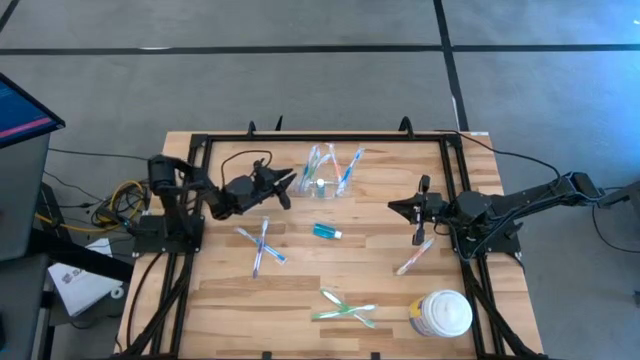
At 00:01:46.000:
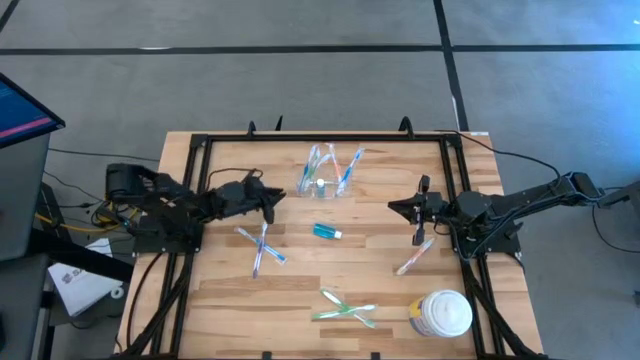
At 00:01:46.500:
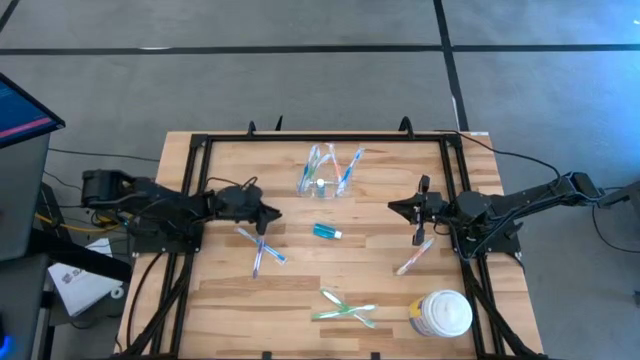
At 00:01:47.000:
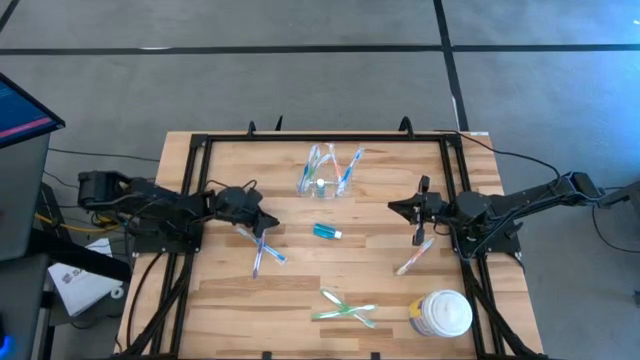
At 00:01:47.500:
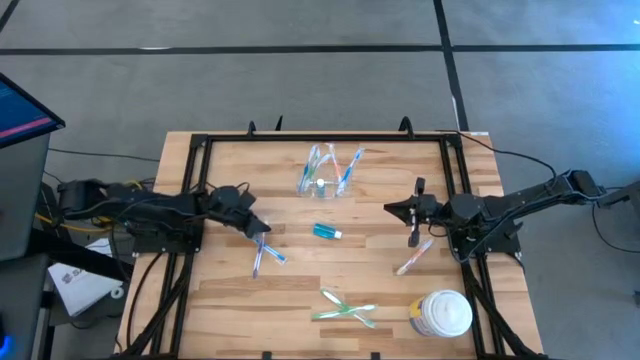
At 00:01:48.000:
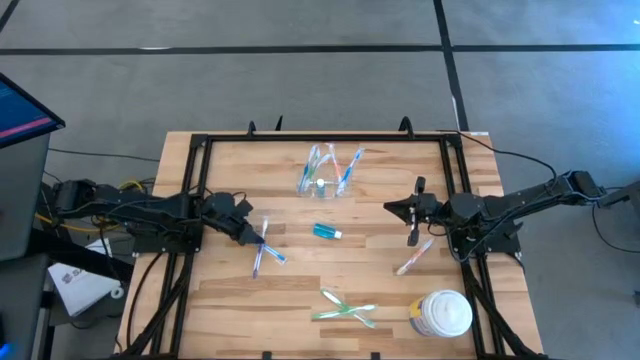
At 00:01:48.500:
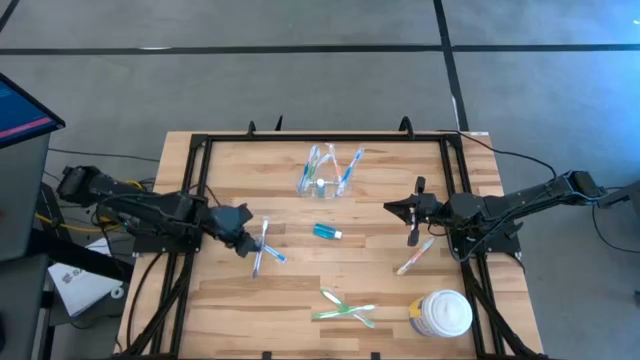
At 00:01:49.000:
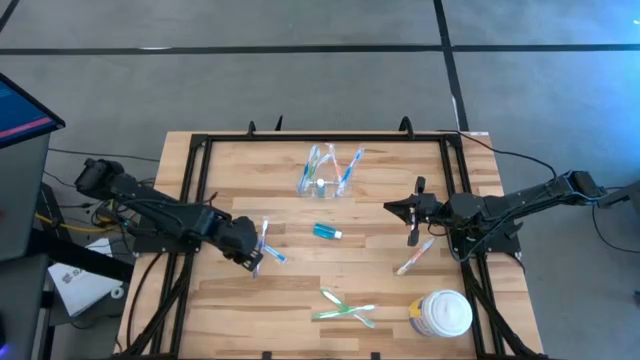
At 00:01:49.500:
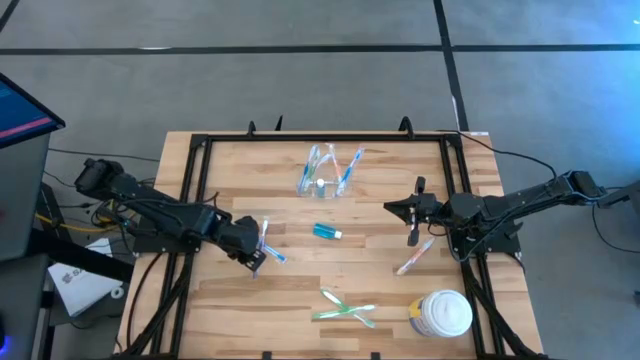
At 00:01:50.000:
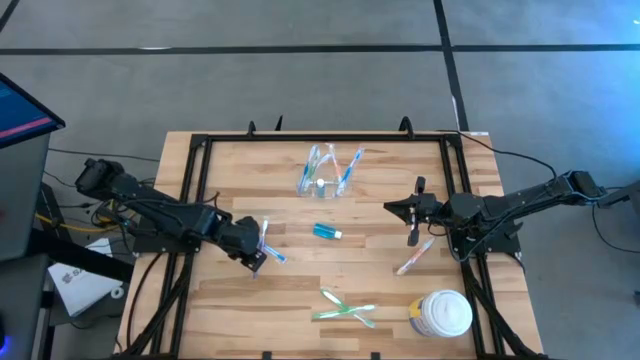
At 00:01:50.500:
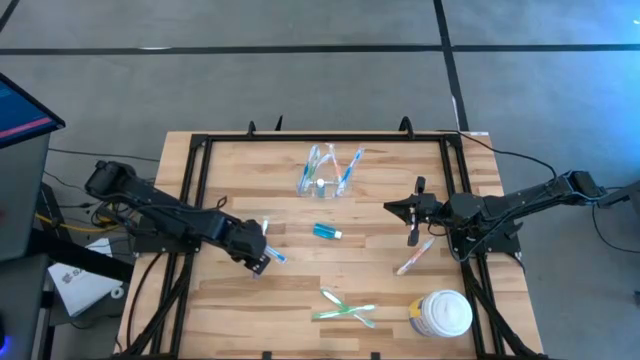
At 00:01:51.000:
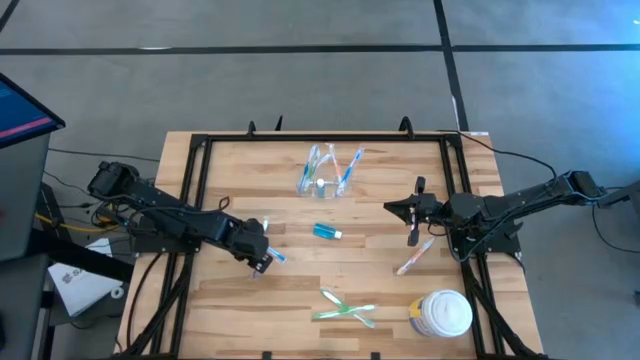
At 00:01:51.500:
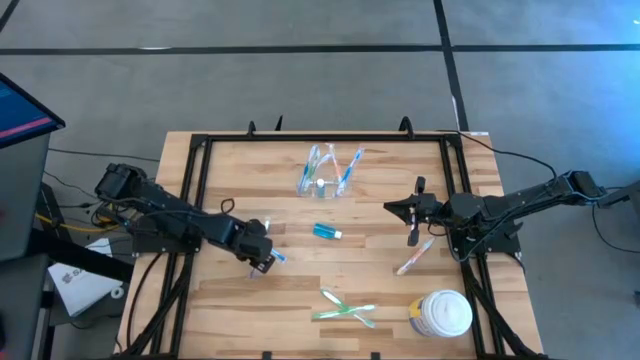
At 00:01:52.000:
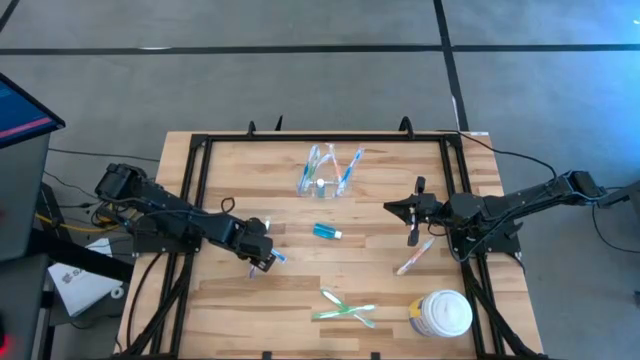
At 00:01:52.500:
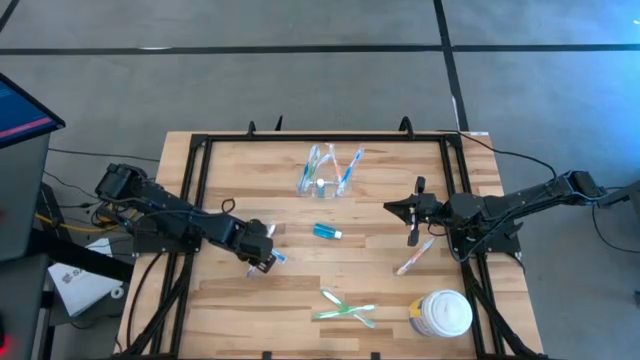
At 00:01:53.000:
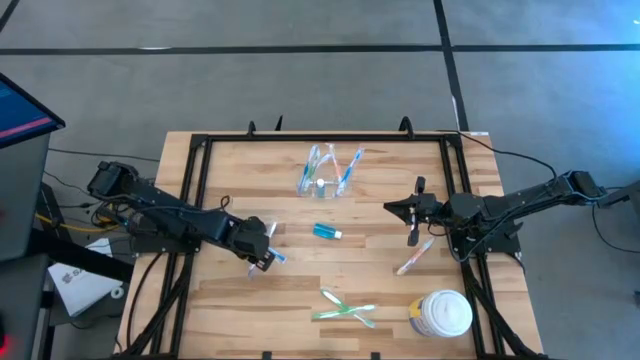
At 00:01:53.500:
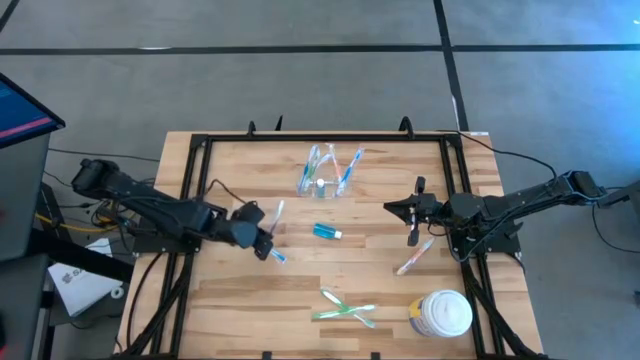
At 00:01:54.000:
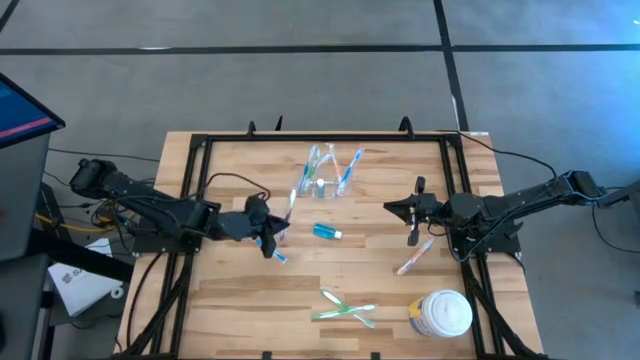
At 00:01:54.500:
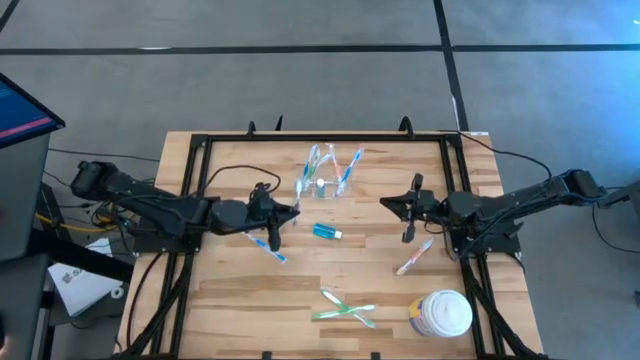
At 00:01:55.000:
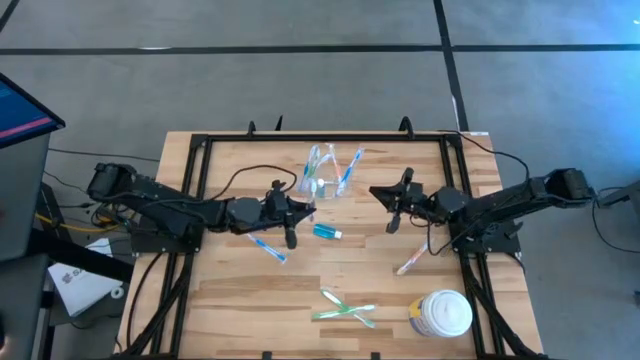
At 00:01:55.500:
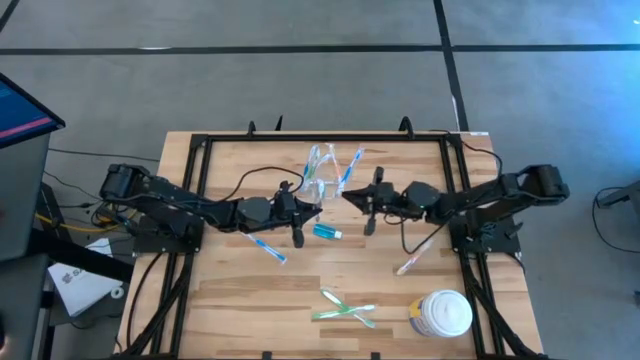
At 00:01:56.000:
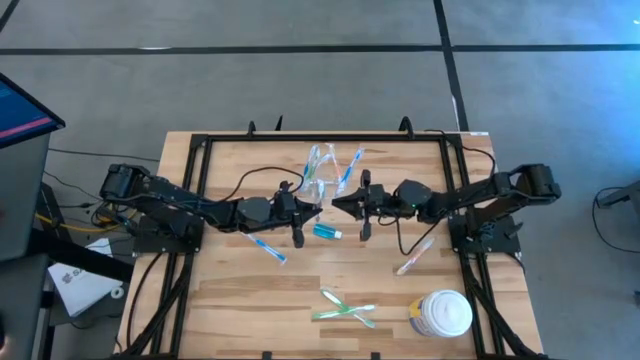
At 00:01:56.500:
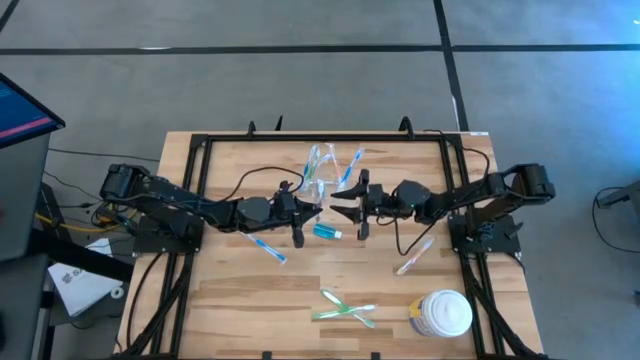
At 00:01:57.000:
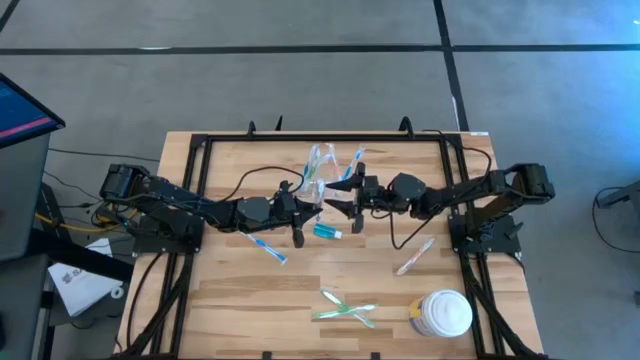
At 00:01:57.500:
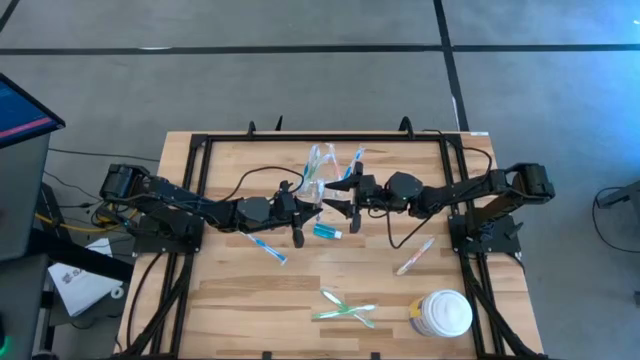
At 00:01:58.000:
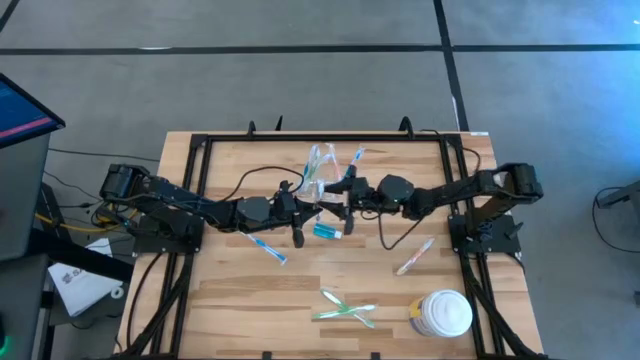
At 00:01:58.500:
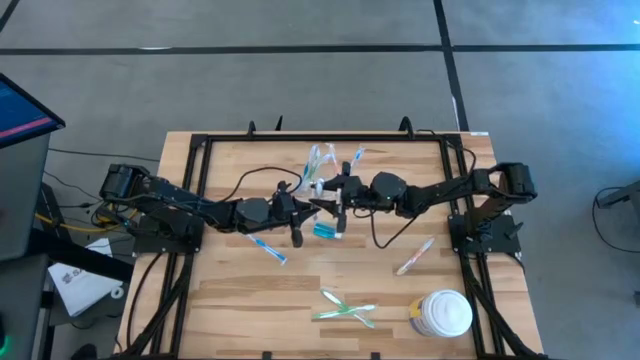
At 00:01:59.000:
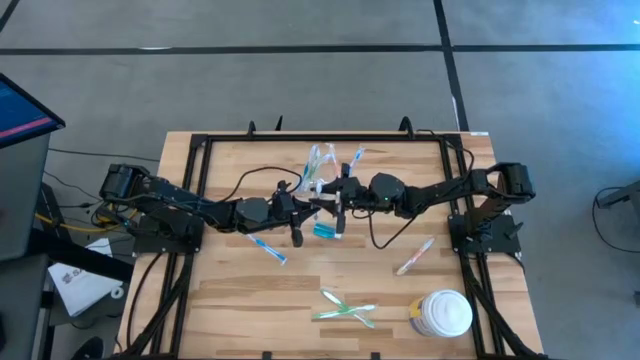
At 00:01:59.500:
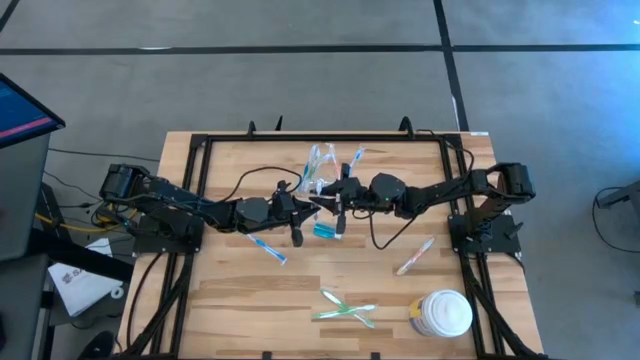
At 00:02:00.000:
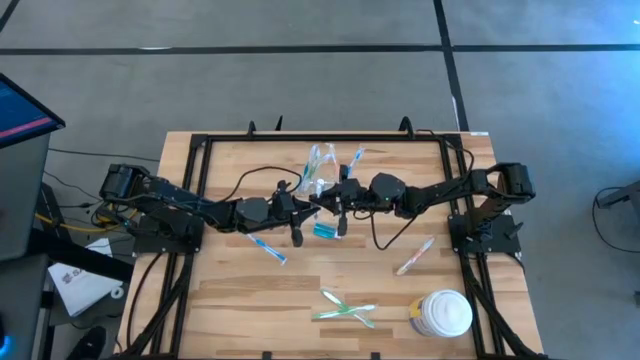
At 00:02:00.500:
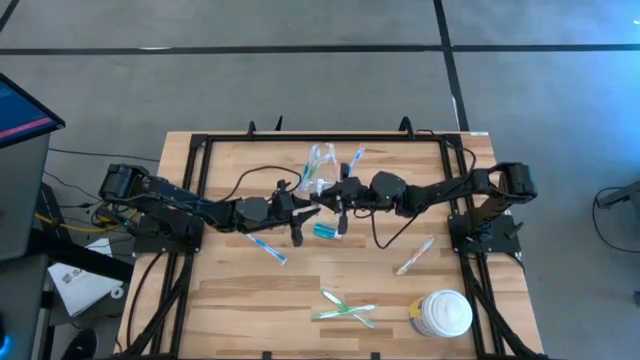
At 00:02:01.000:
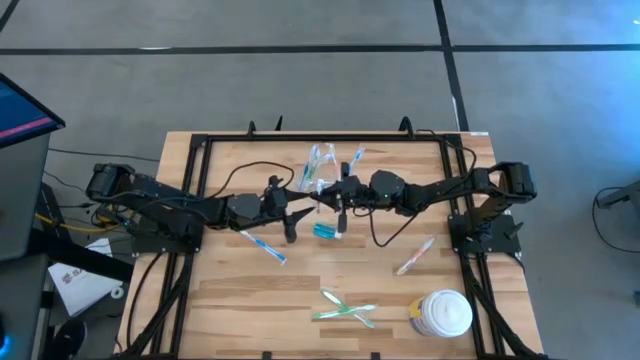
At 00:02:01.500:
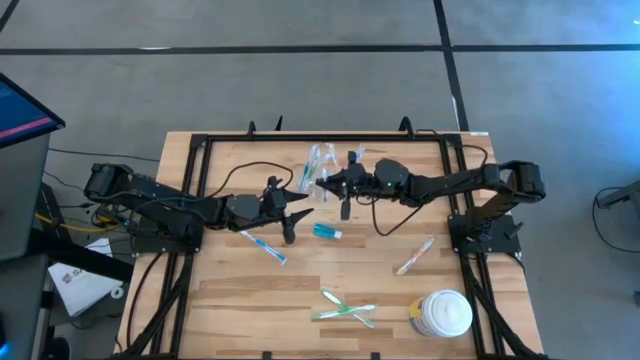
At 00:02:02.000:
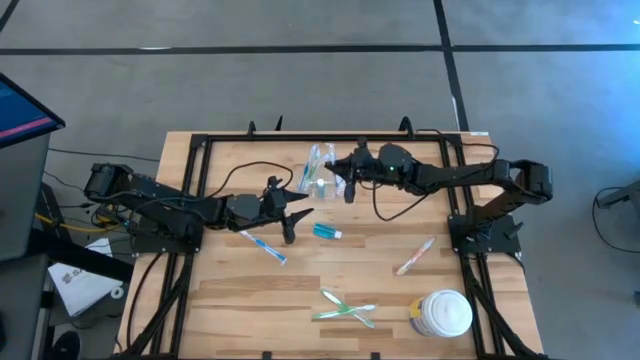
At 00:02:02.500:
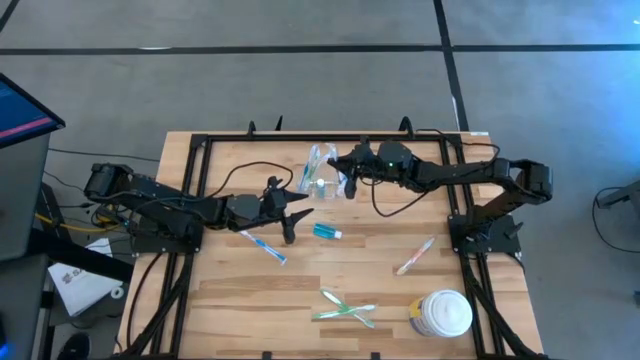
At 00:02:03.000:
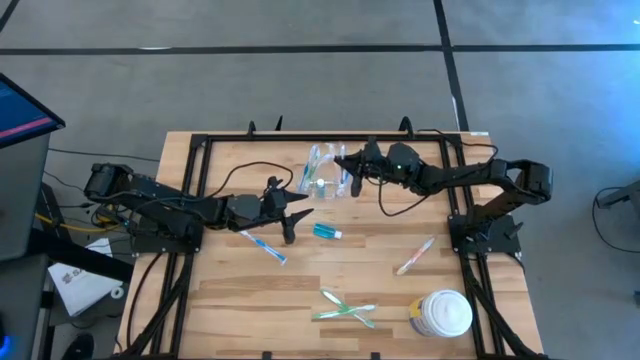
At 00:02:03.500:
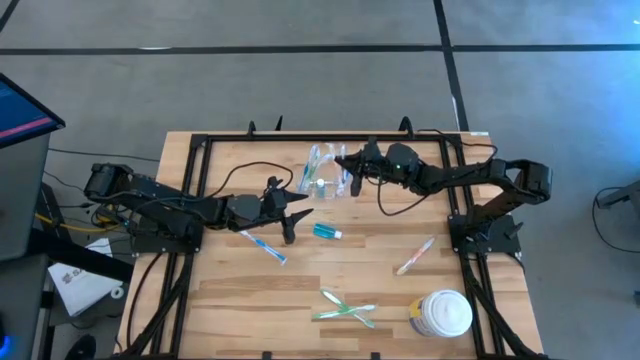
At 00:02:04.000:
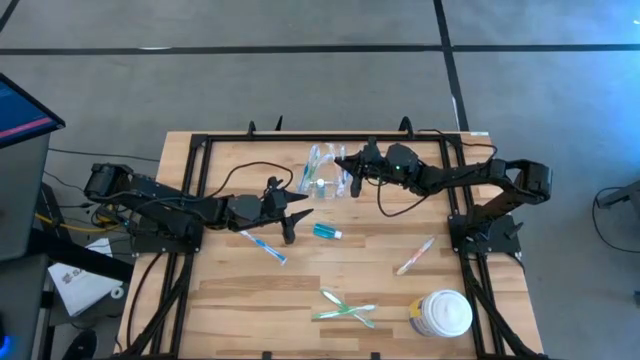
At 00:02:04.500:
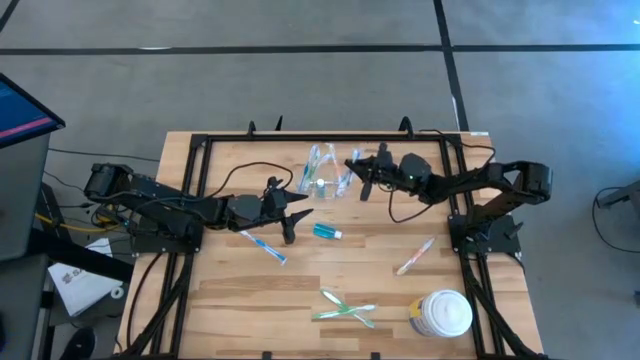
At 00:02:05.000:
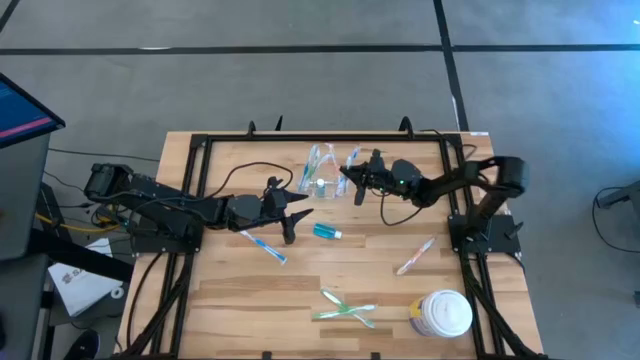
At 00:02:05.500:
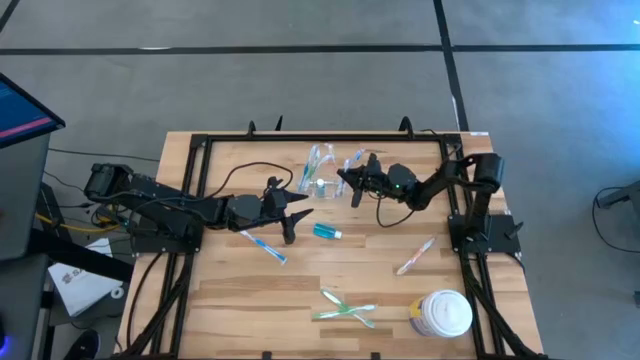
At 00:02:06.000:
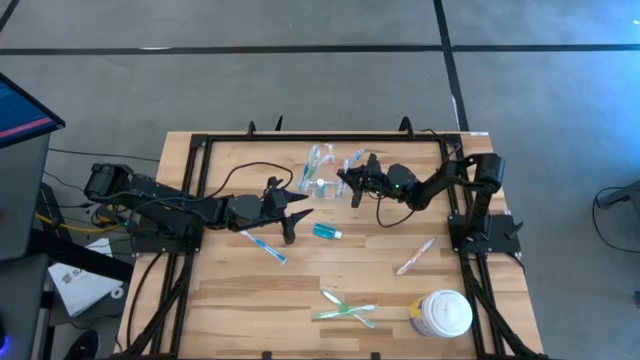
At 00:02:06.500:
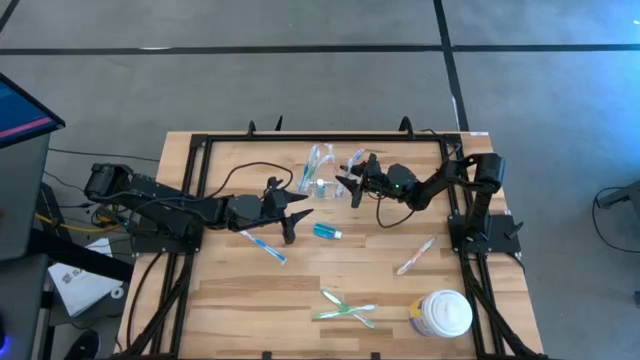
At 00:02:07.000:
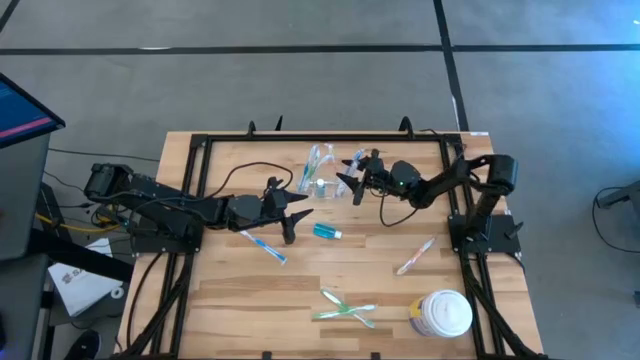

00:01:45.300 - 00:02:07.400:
Task: Pick & Place toothbrushing station
Put the purple toothbrush into the transparent organizer
